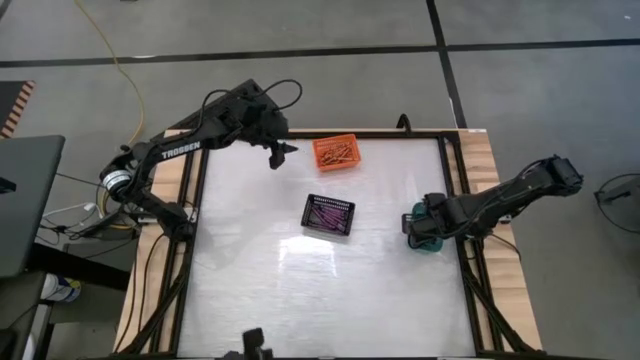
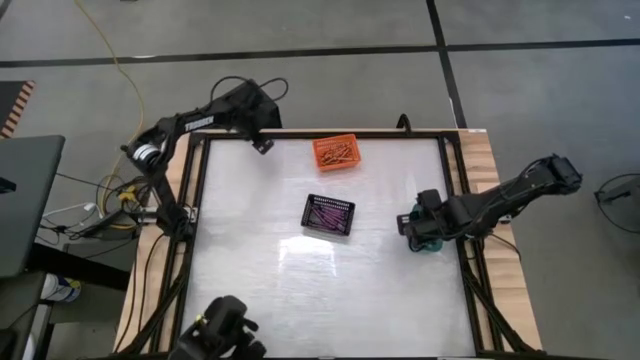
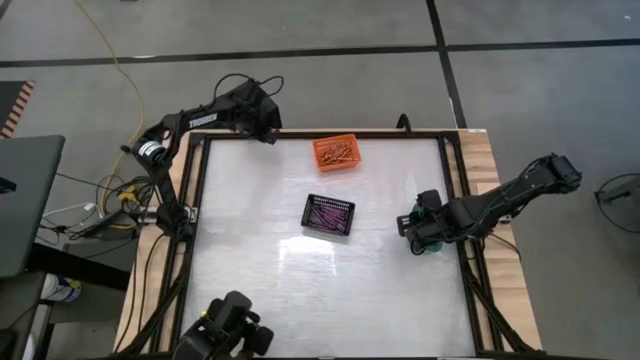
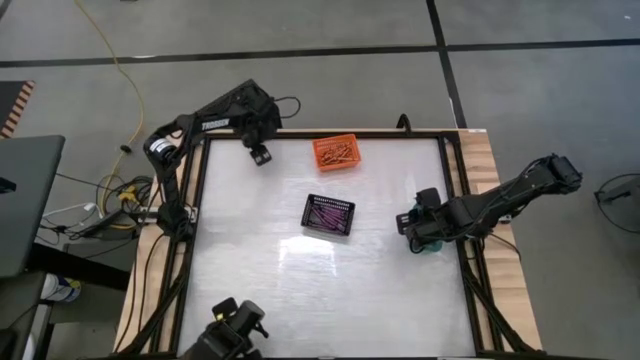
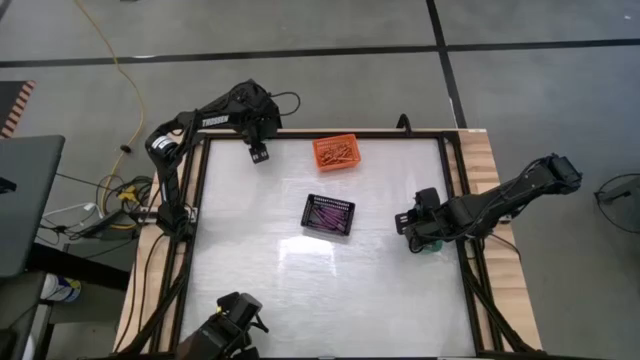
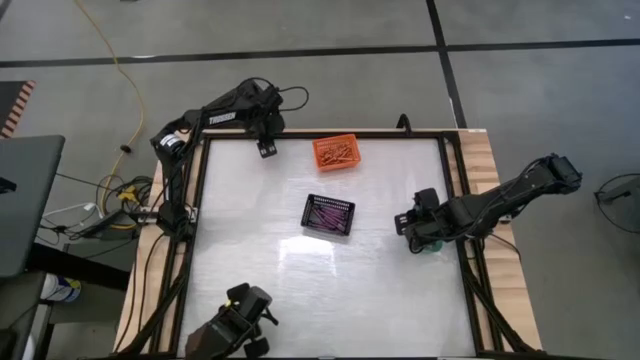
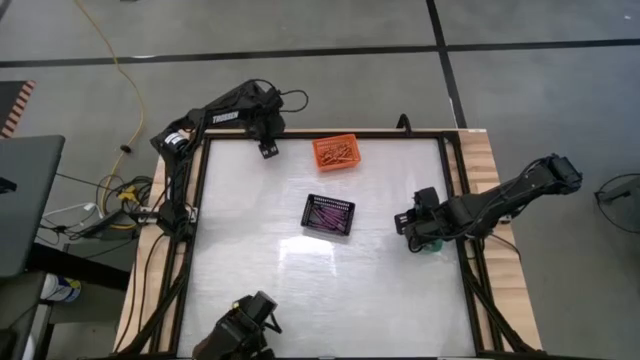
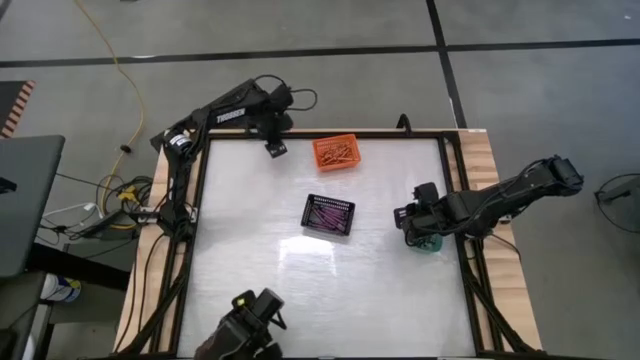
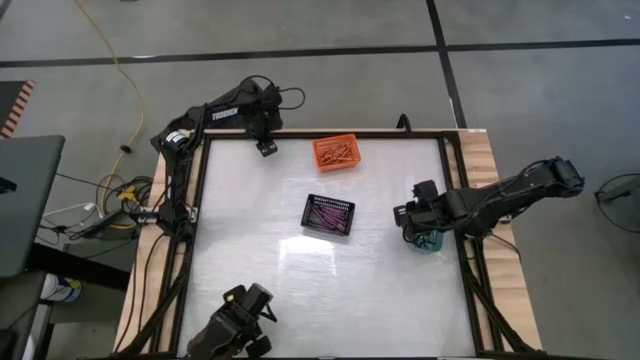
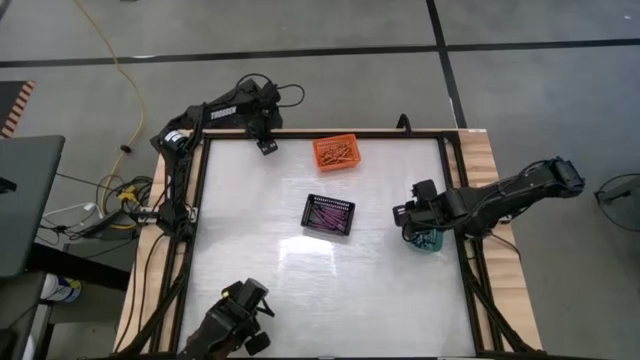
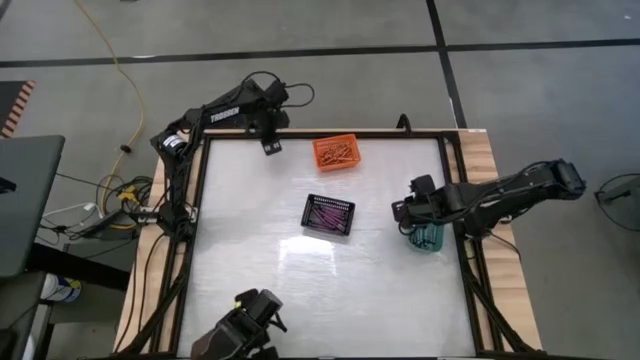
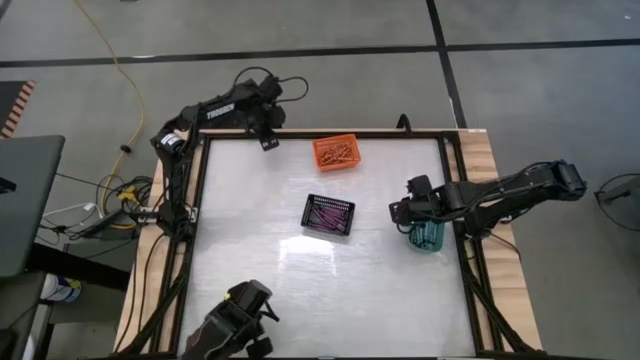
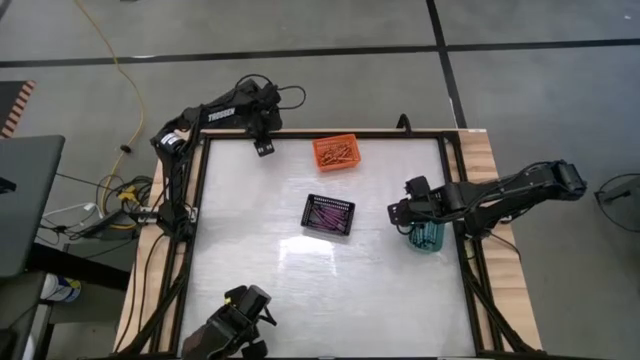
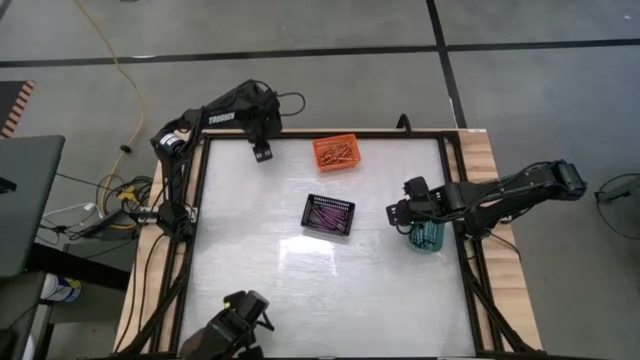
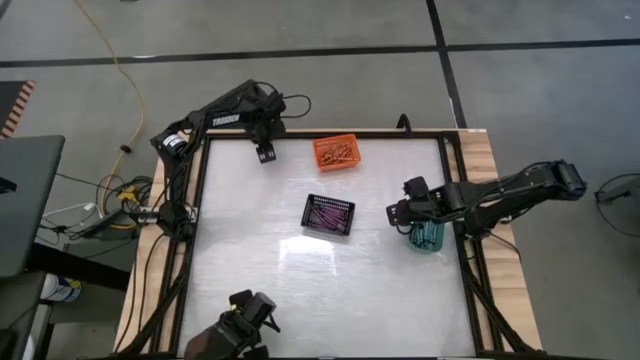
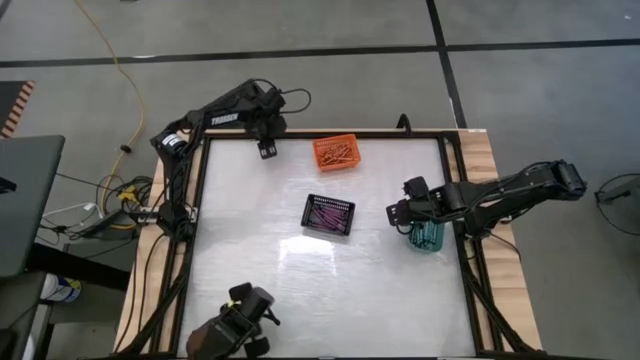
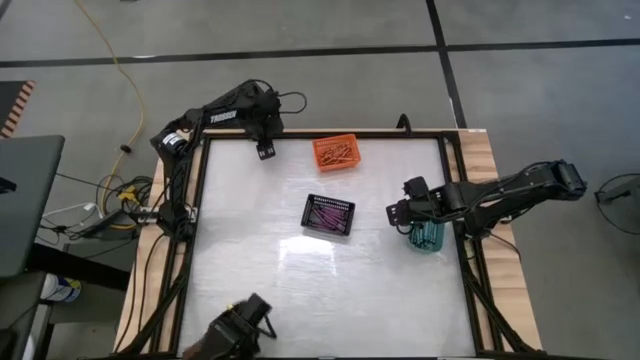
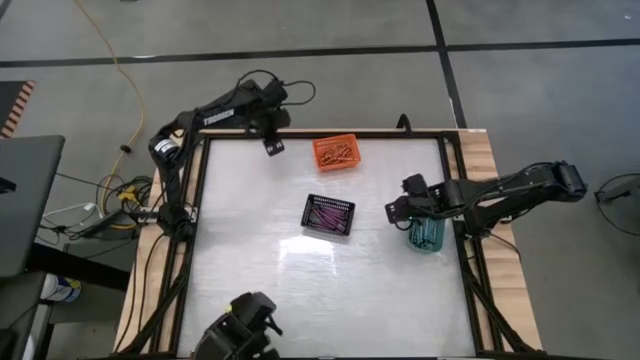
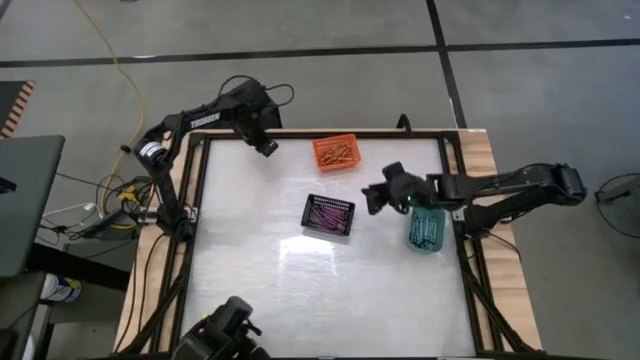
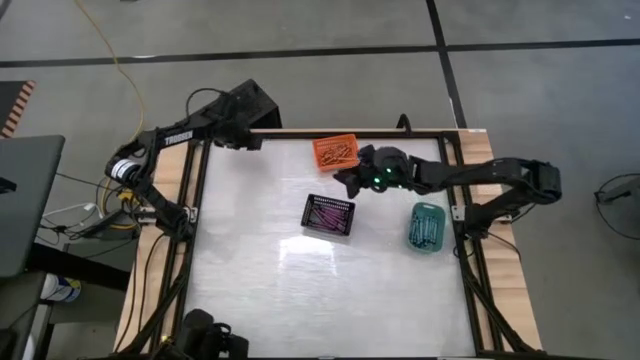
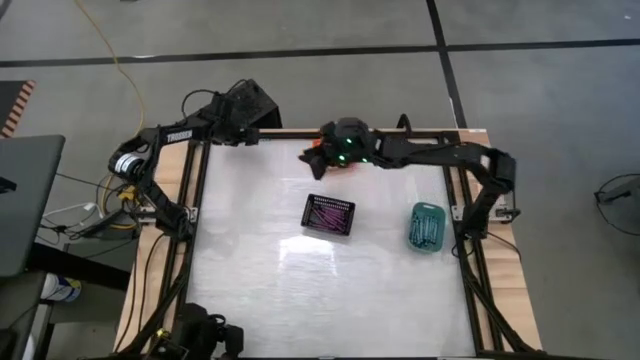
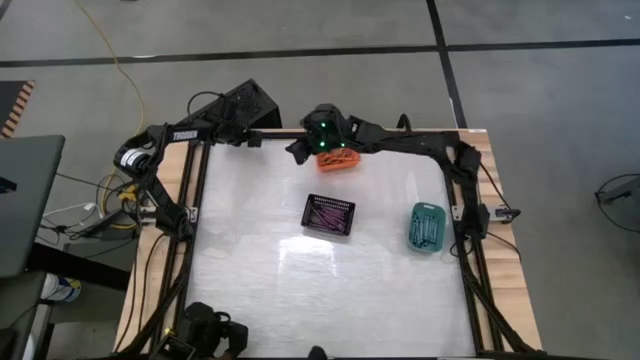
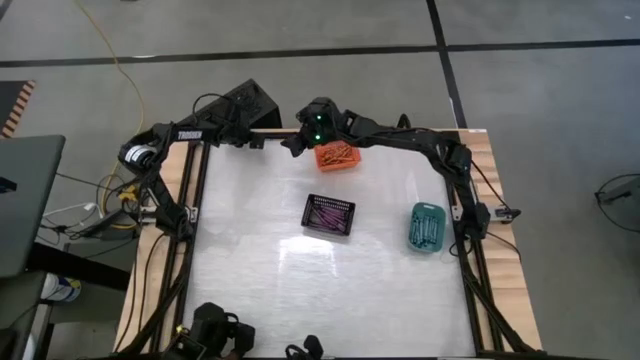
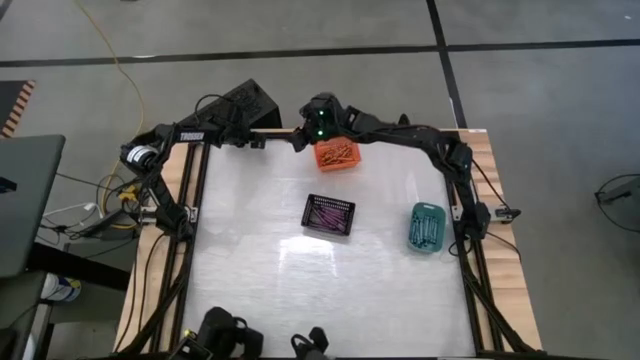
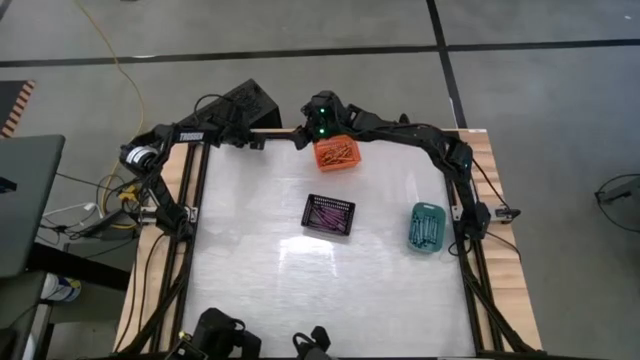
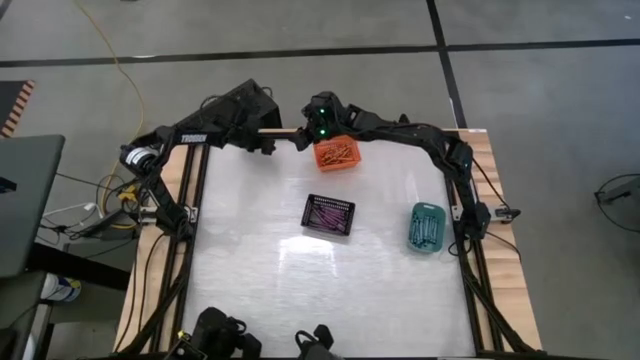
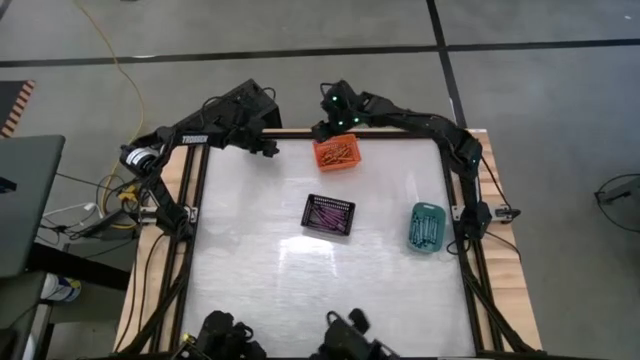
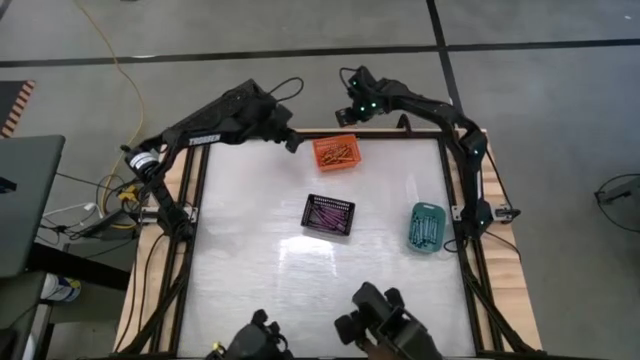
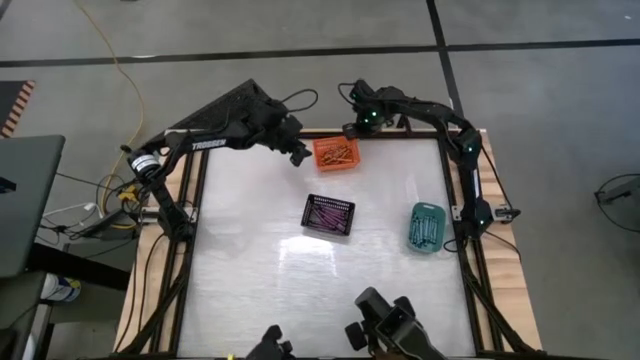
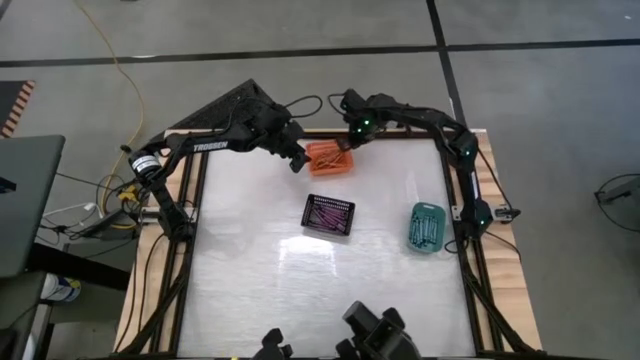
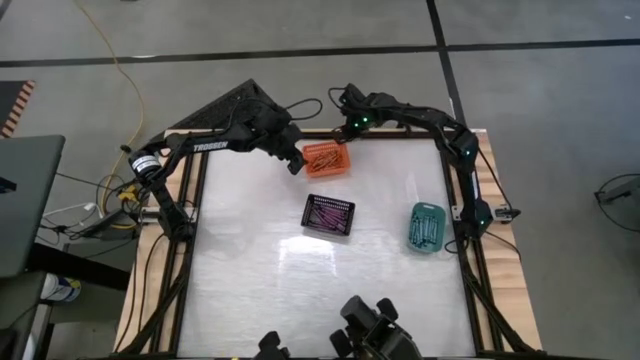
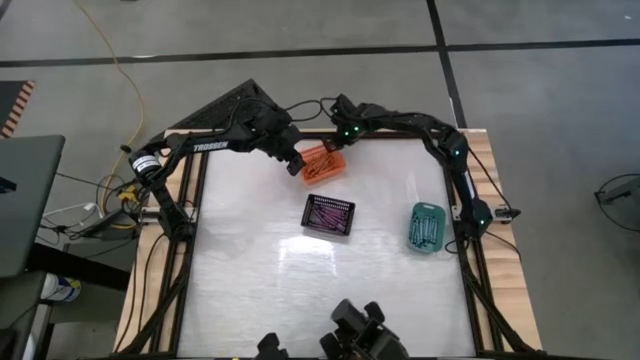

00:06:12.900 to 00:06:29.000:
Task: Sort crayons
Put the light blue green crayon into the green bin

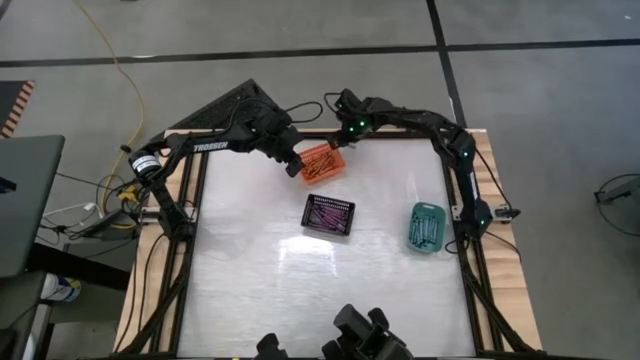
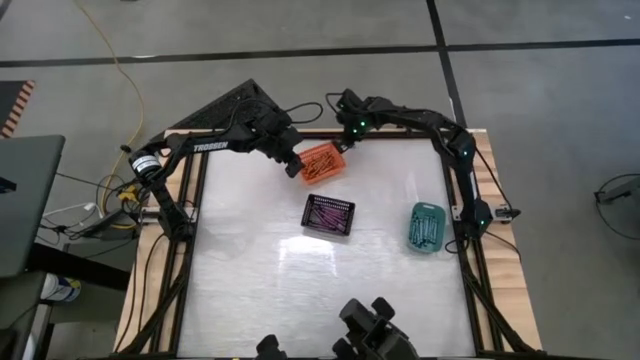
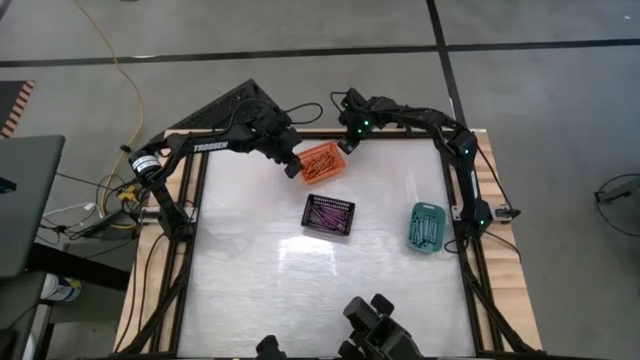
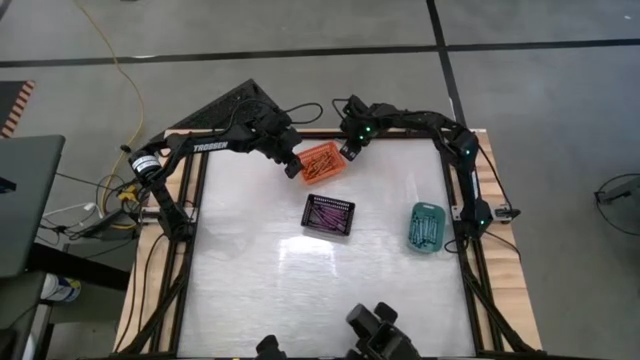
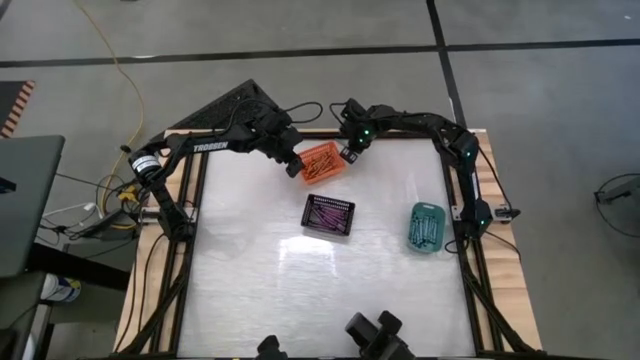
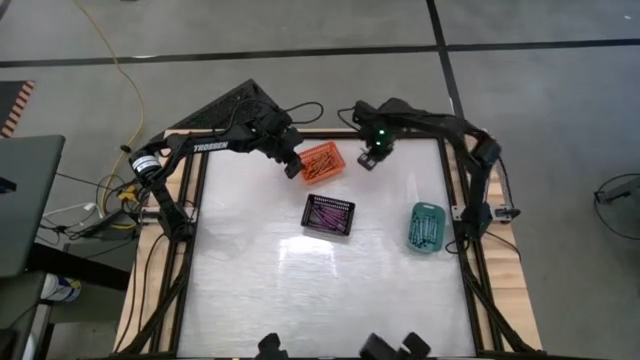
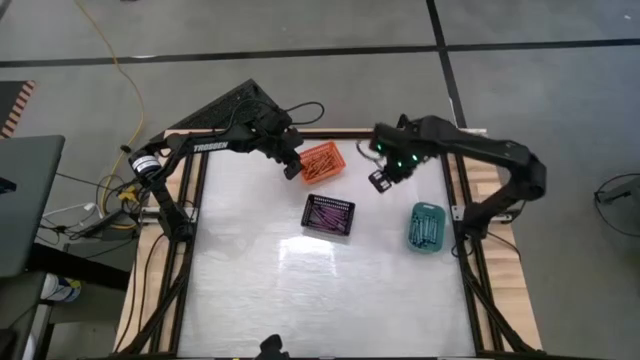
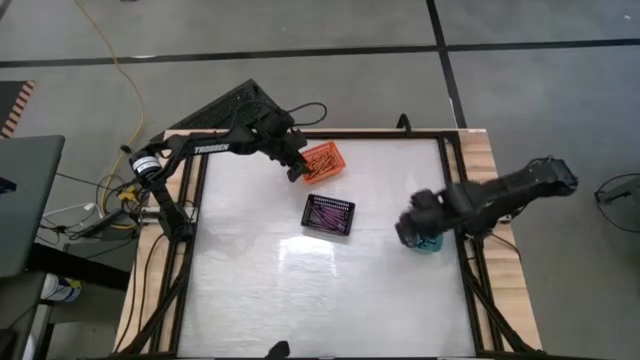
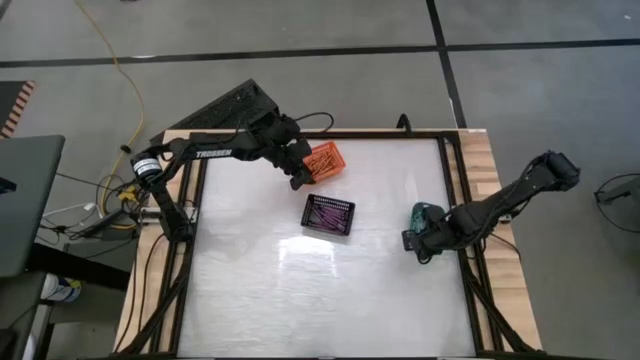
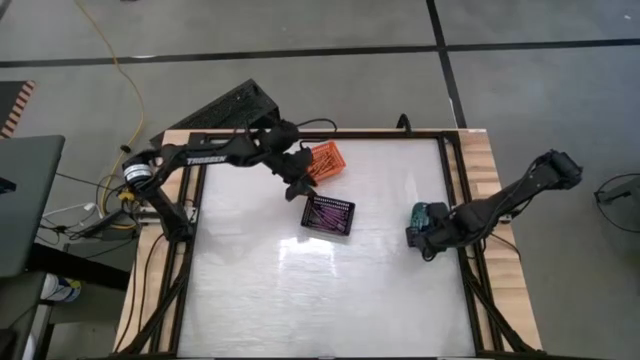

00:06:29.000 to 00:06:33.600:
Put the light blue green crayon into the green bin
